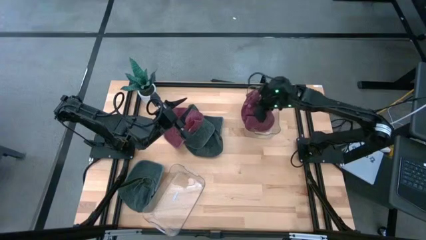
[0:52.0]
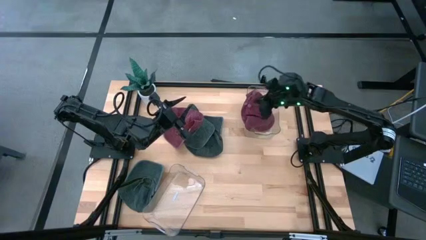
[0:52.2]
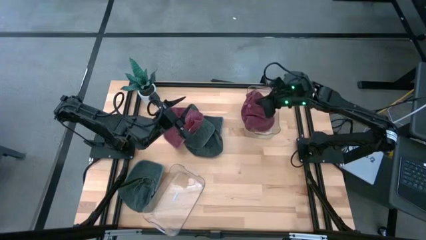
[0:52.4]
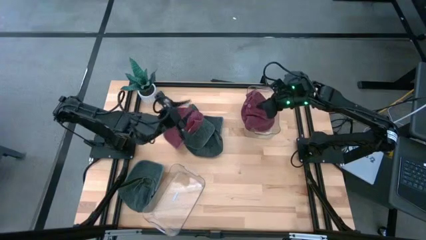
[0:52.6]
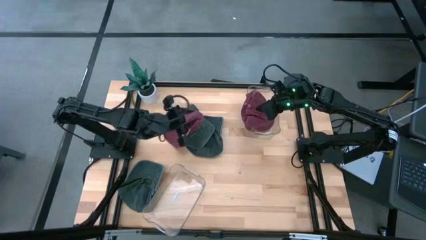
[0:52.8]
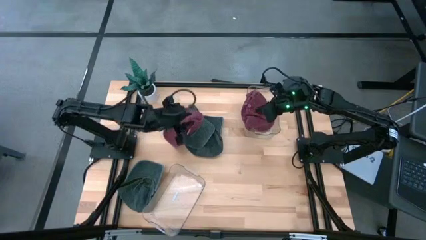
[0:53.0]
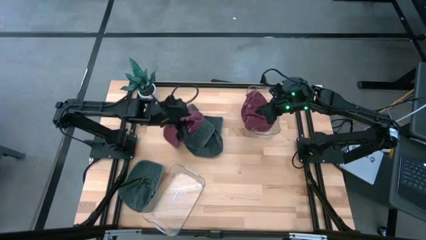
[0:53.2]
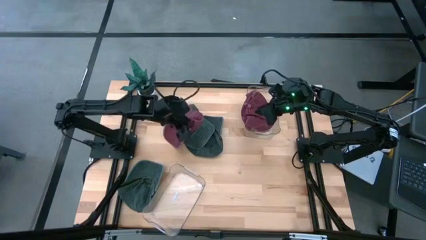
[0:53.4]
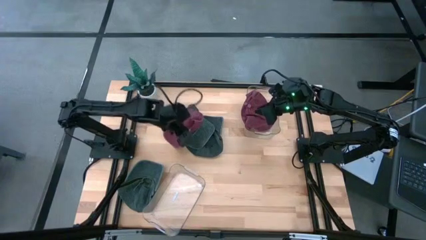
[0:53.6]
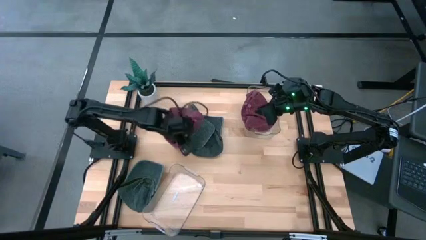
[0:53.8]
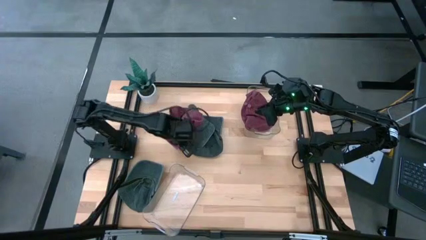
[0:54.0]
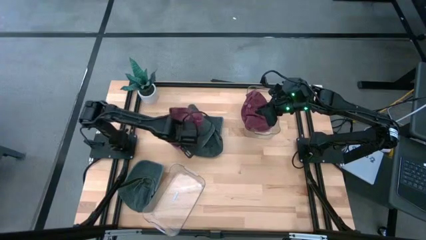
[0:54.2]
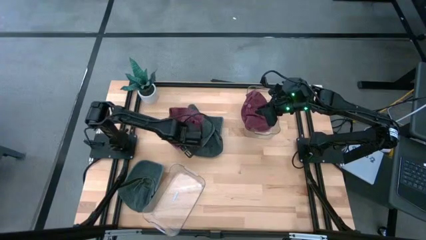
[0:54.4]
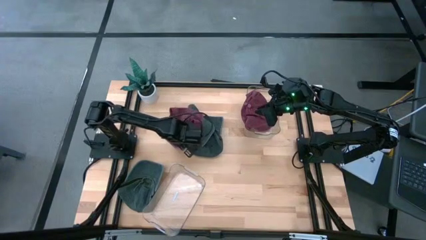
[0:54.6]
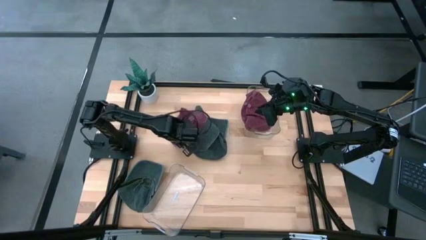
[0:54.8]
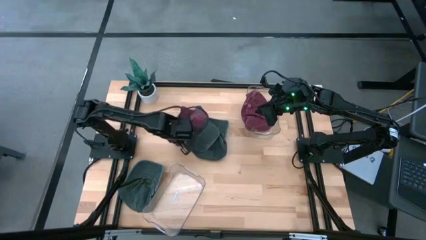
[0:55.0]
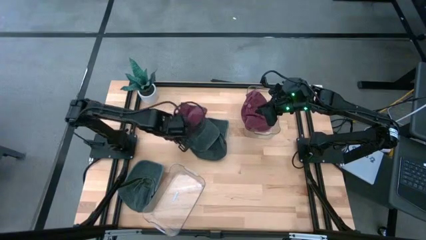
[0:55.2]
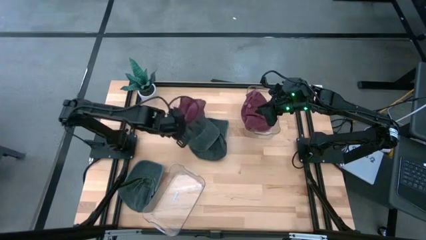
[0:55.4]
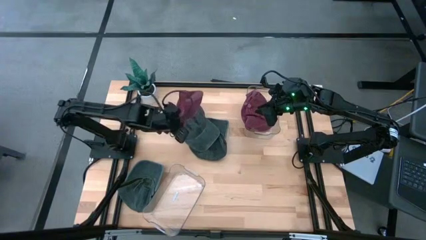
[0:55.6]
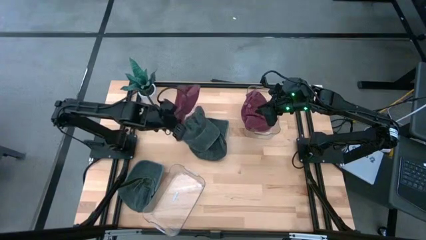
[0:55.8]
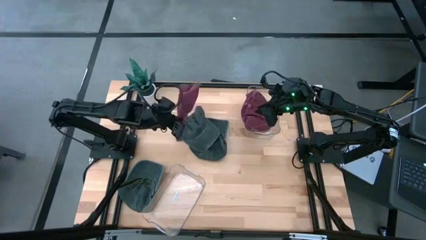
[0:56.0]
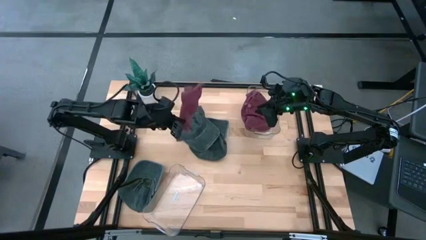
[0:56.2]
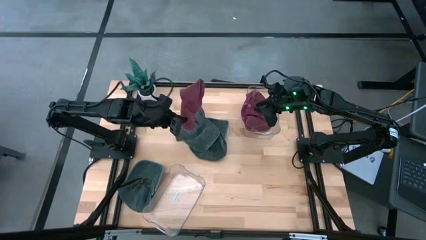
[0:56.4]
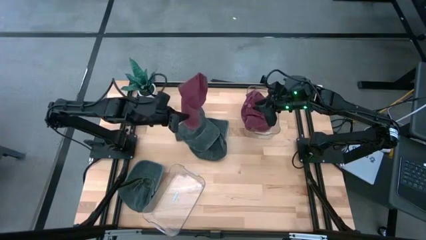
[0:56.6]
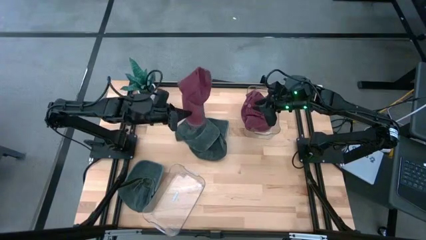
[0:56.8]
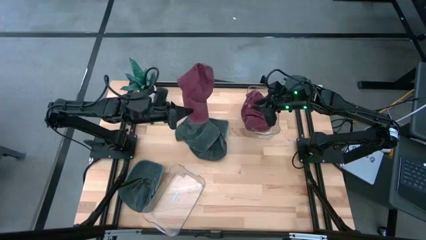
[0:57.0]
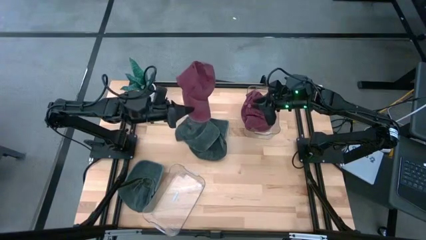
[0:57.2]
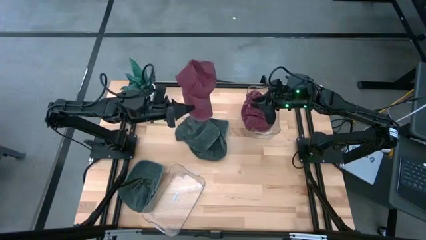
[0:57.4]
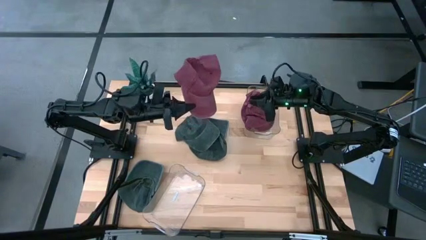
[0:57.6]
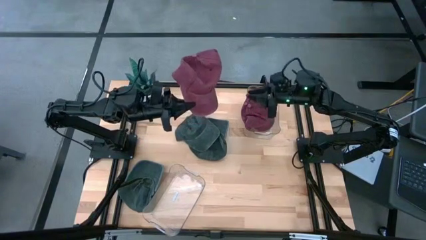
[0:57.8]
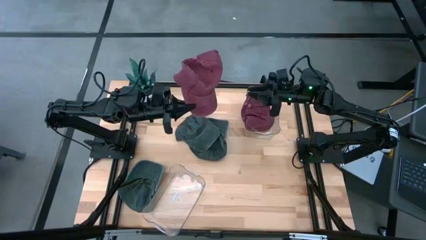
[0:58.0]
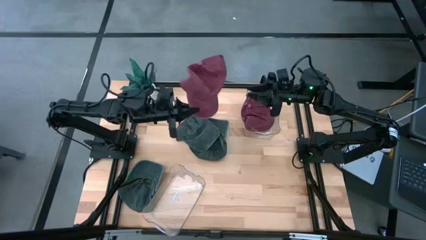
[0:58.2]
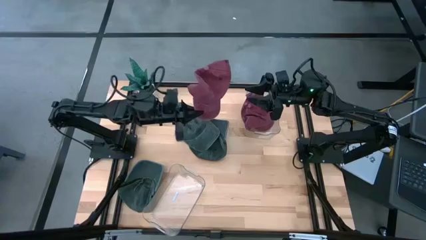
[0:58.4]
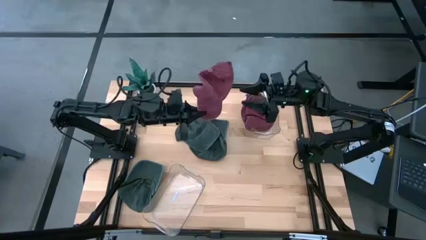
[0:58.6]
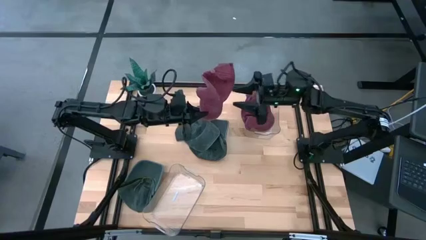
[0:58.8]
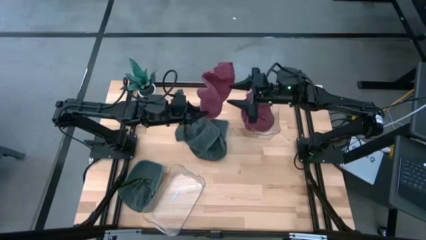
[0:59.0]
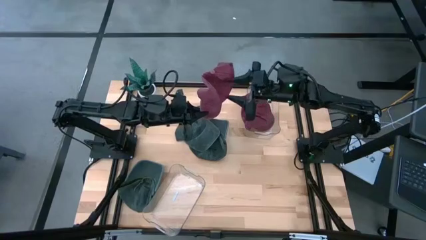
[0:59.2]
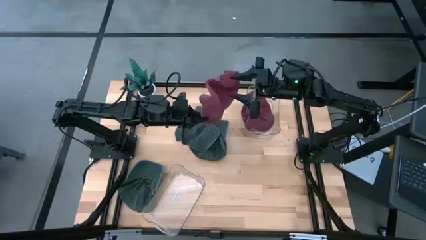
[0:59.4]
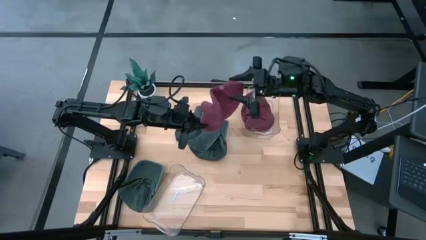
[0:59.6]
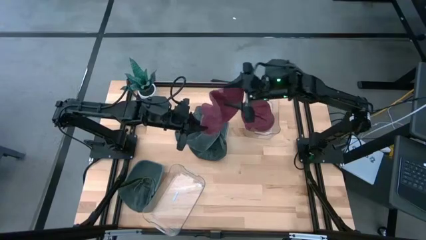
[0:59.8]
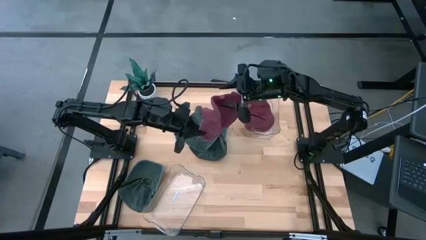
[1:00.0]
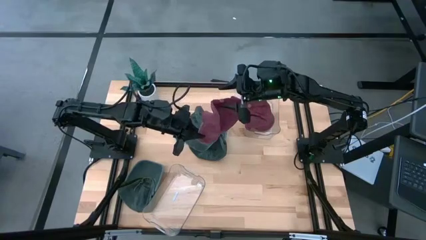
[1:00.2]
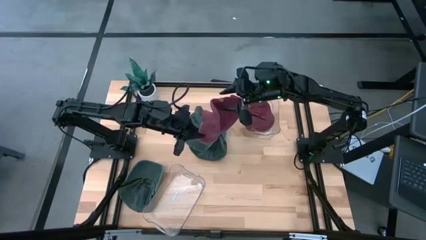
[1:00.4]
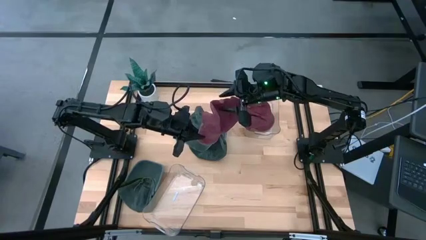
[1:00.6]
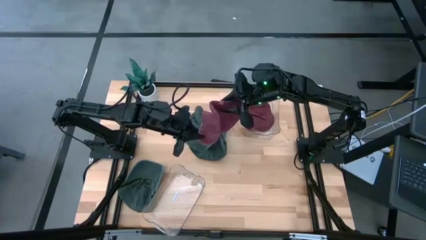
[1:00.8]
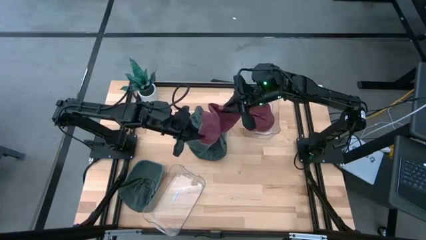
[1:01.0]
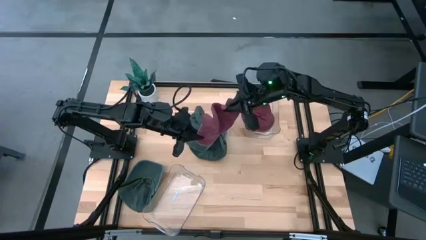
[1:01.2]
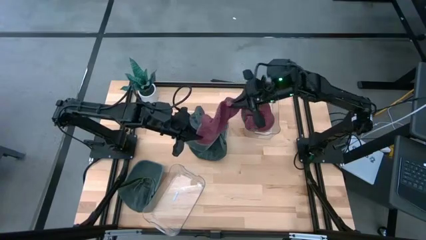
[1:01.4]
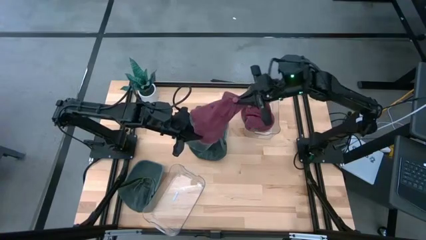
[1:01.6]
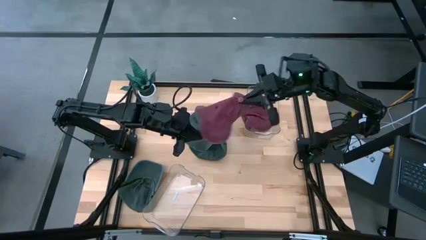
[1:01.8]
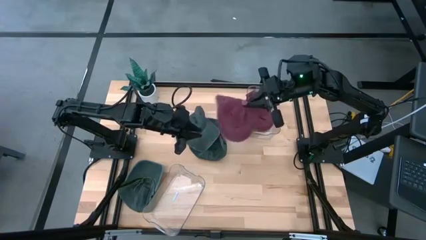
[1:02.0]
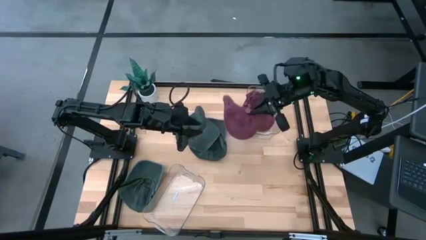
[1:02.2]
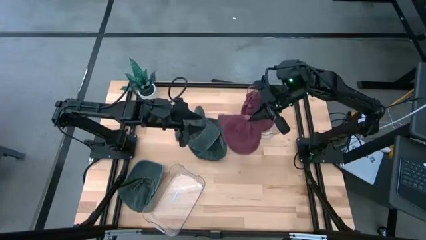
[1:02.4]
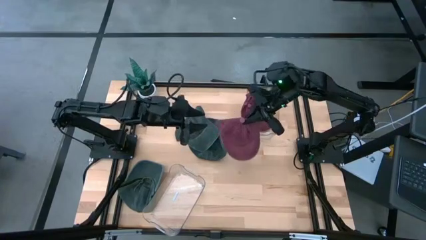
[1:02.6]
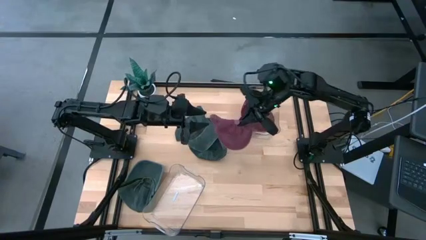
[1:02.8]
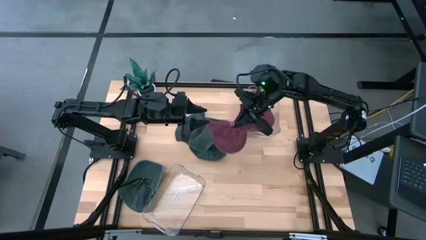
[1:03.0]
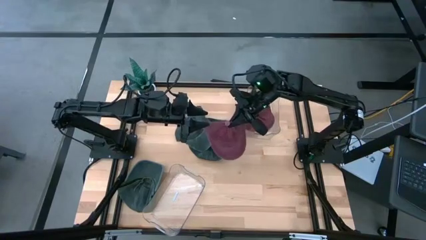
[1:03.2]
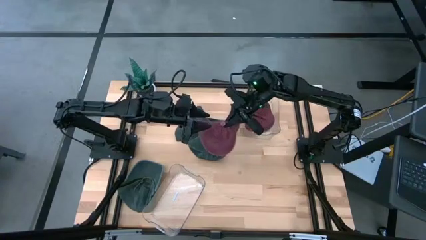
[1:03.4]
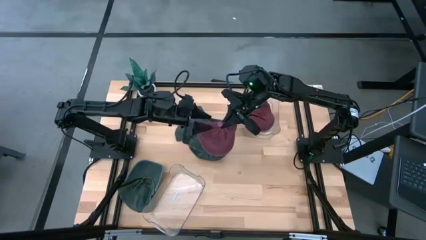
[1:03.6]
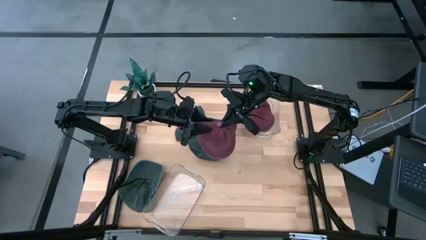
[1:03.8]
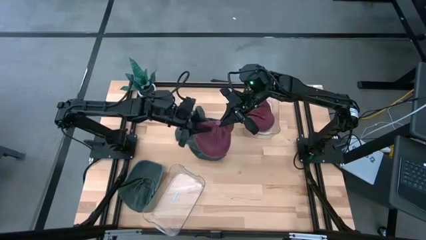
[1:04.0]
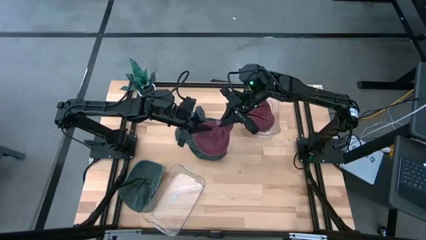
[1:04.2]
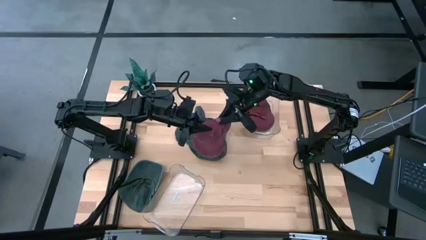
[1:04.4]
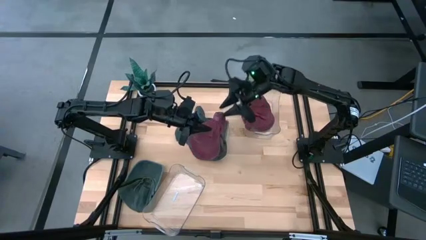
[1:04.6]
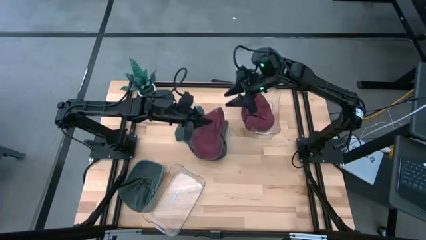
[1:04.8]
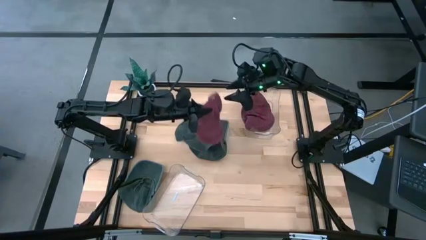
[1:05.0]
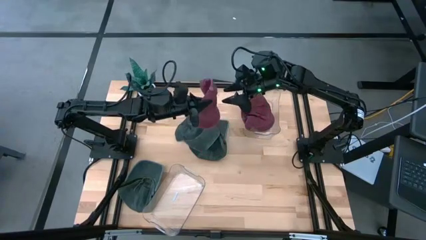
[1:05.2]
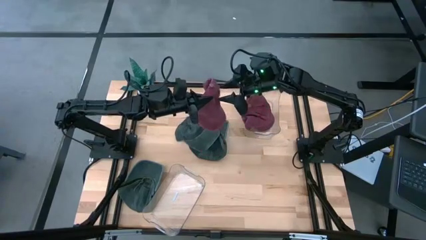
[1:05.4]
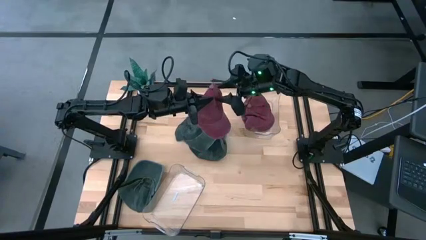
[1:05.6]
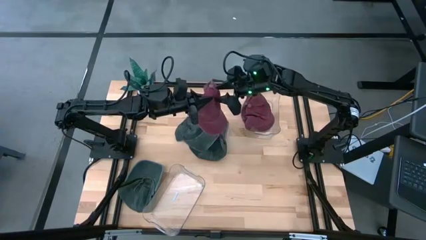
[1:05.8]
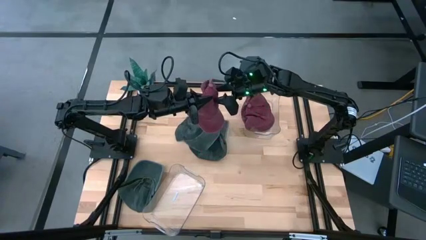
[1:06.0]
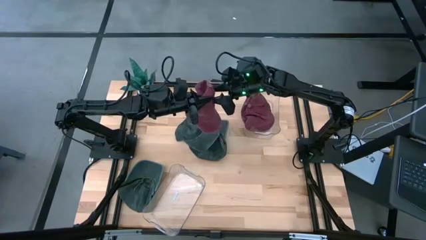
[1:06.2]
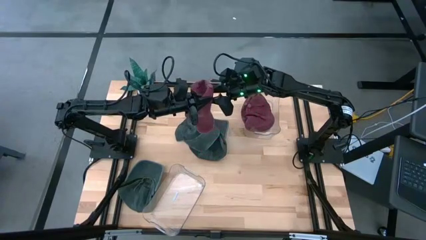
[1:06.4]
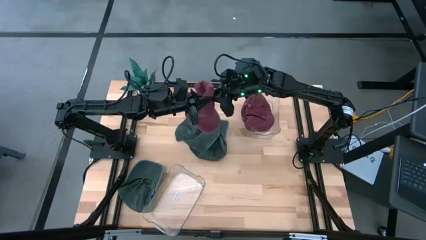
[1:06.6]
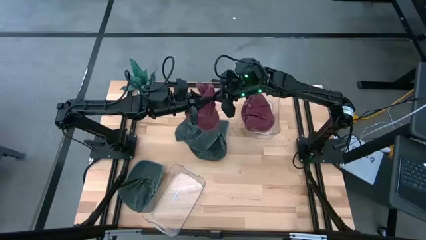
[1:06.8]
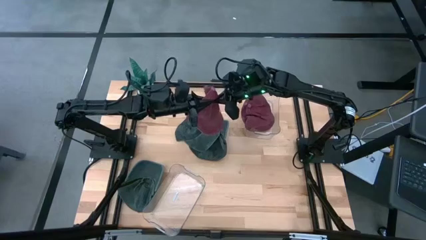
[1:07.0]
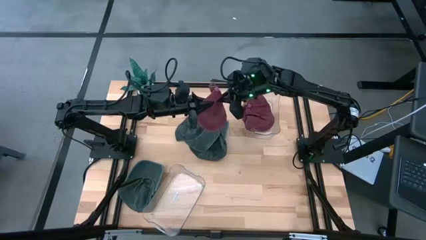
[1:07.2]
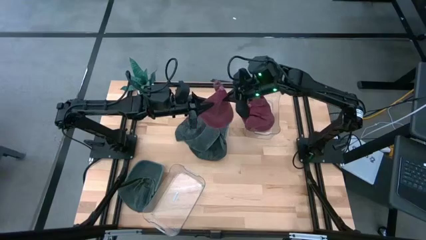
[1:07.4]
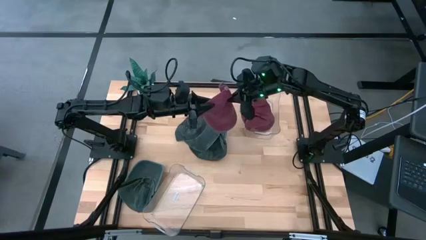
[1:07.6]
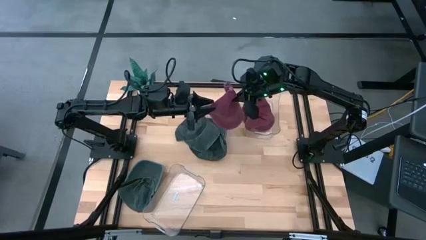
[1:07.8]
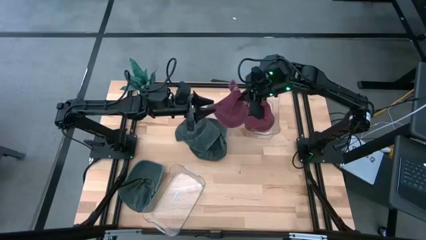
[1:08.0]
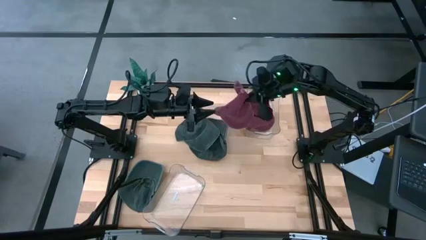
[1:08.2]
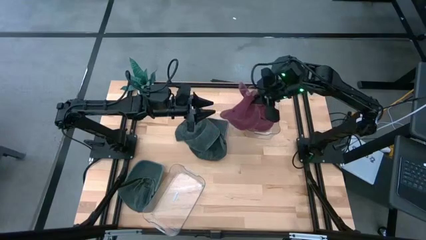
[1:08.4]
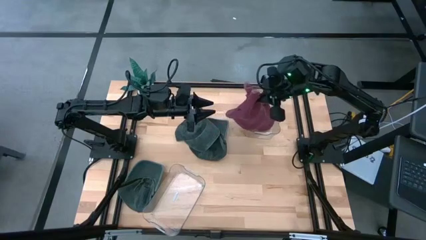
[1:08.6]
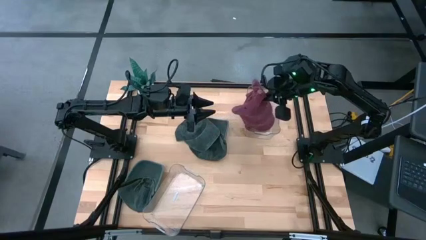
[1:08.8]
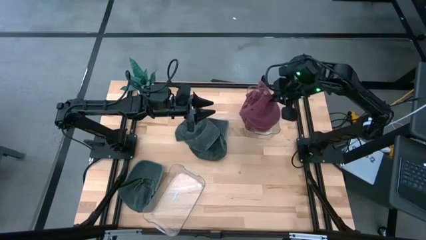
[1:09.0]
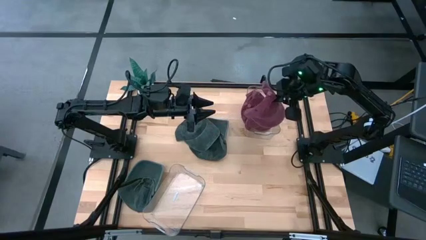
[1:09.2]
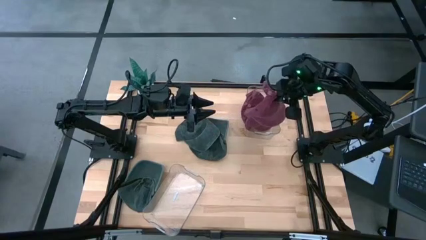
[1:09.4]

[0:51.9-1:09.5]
Task: Pick & Place hat
Put the red cap into the top transparent bin
